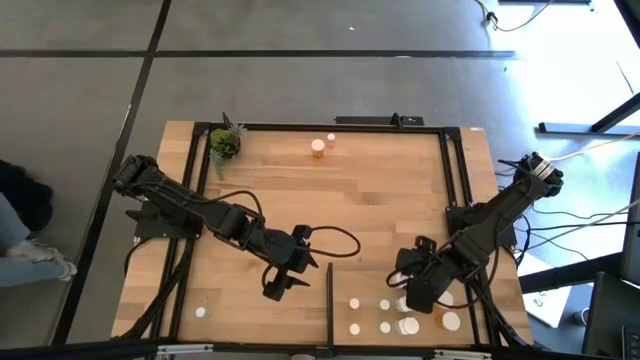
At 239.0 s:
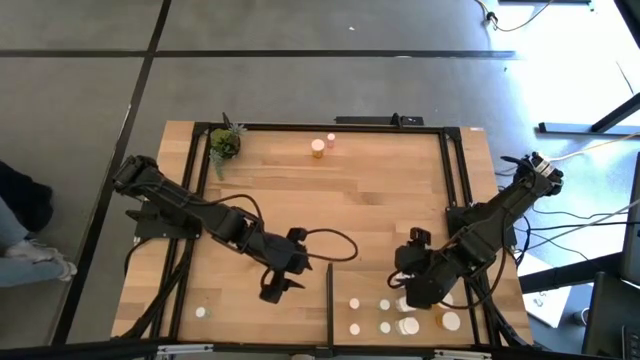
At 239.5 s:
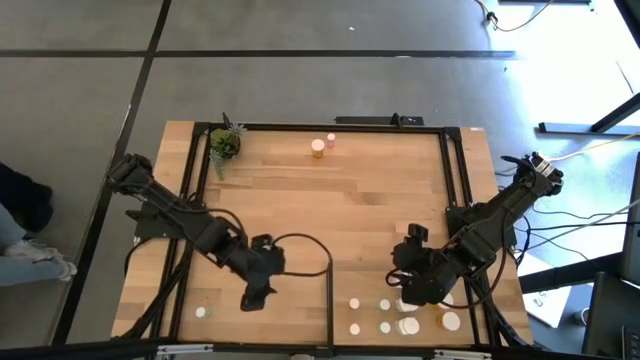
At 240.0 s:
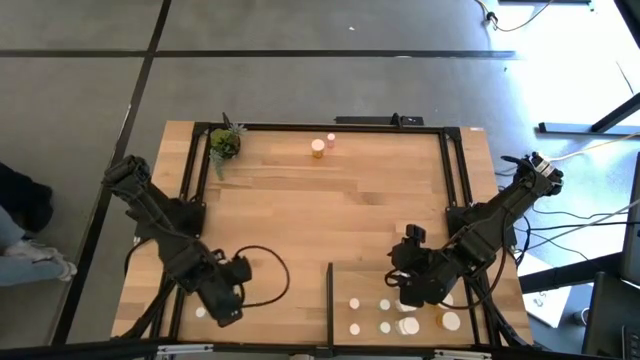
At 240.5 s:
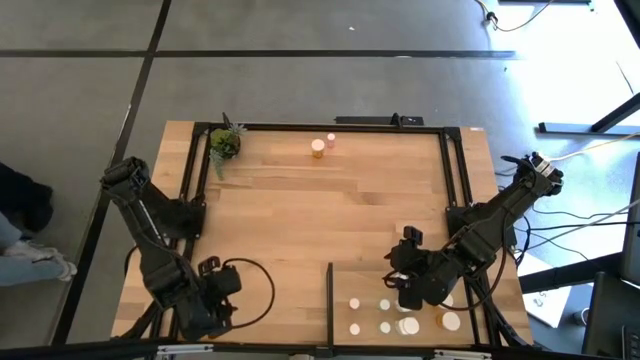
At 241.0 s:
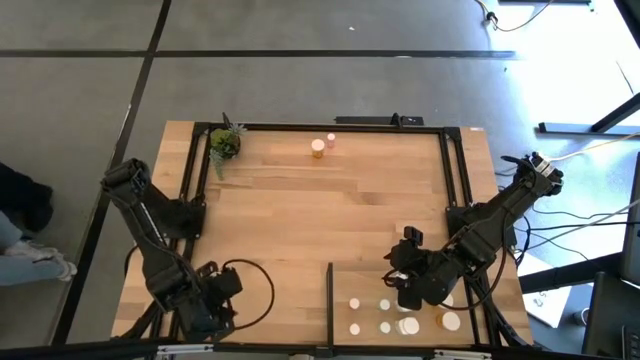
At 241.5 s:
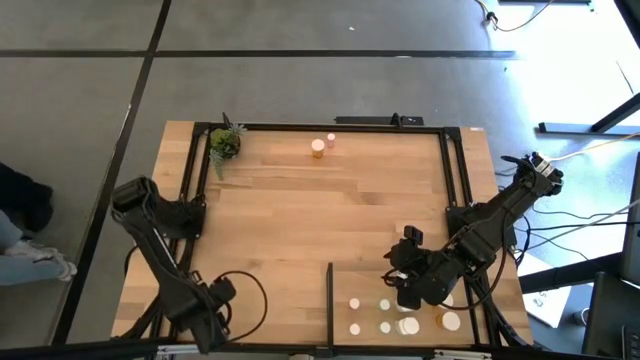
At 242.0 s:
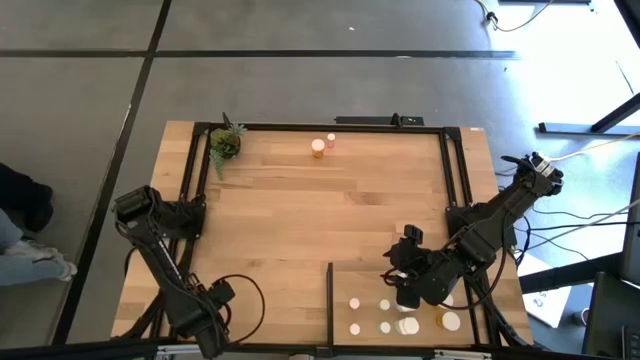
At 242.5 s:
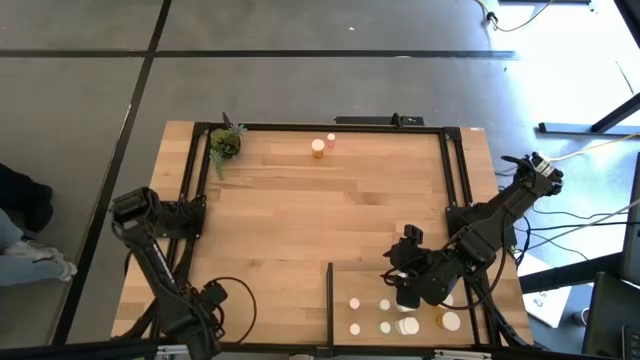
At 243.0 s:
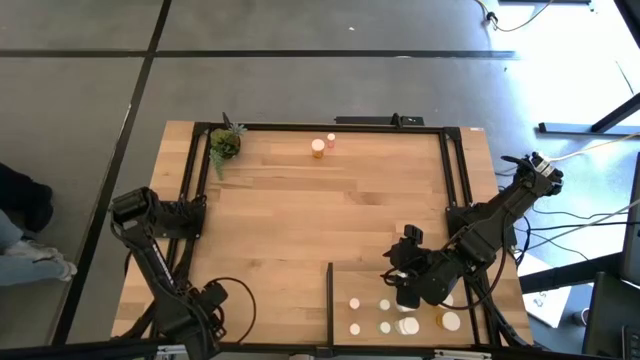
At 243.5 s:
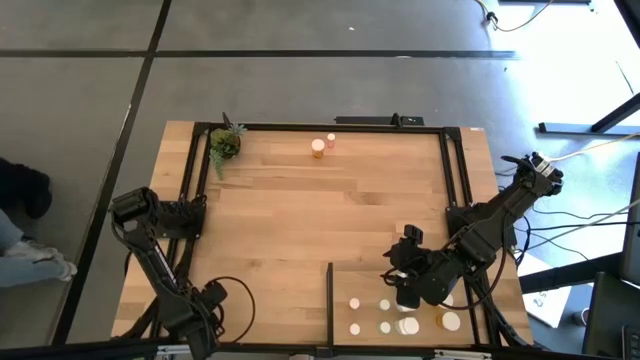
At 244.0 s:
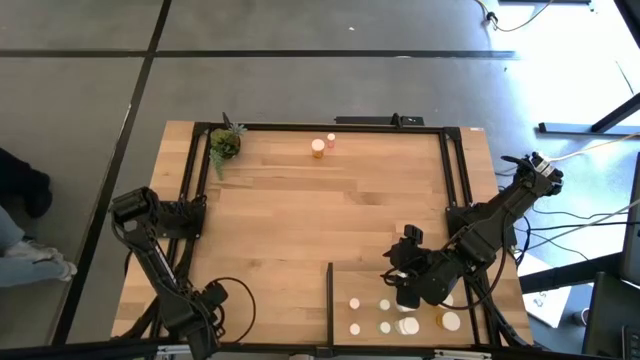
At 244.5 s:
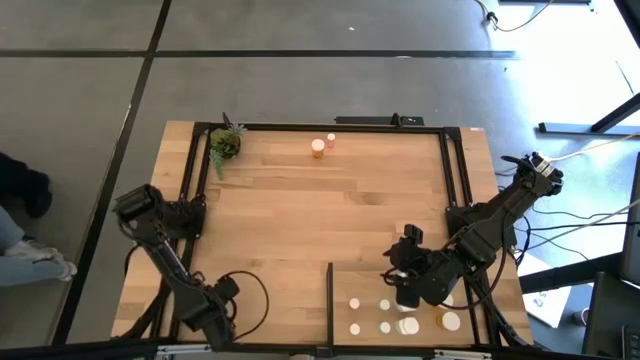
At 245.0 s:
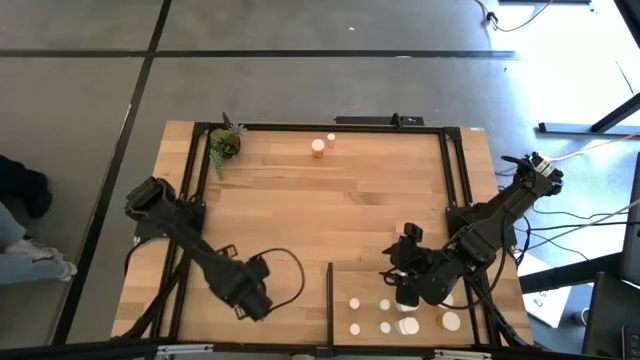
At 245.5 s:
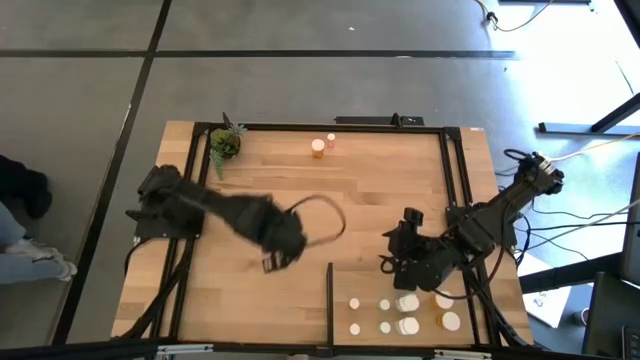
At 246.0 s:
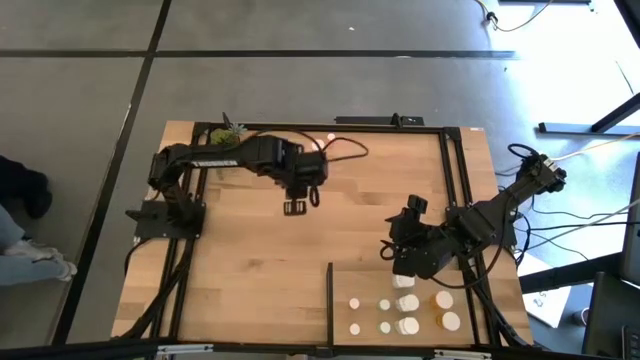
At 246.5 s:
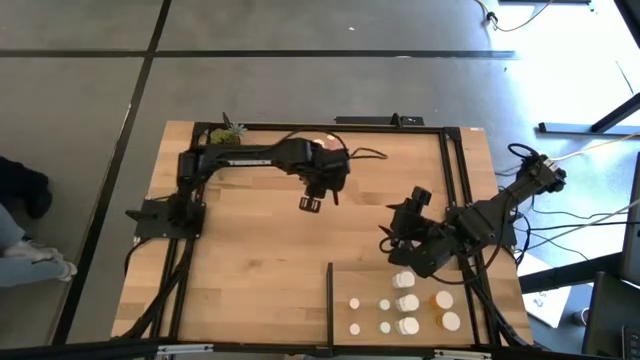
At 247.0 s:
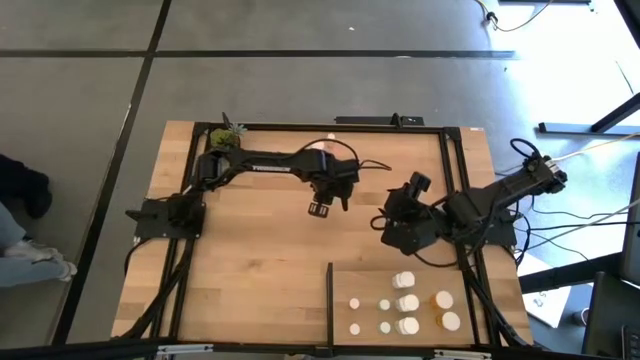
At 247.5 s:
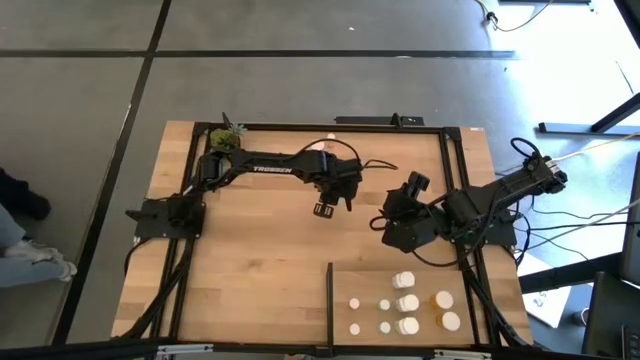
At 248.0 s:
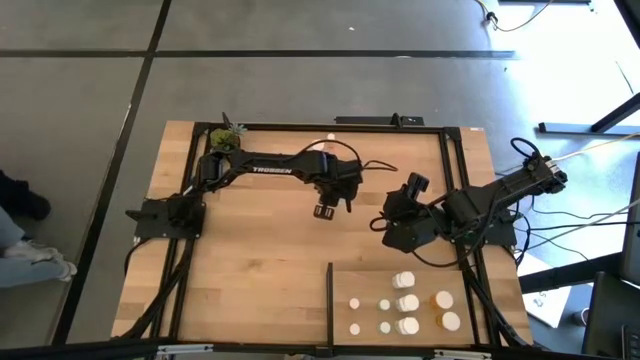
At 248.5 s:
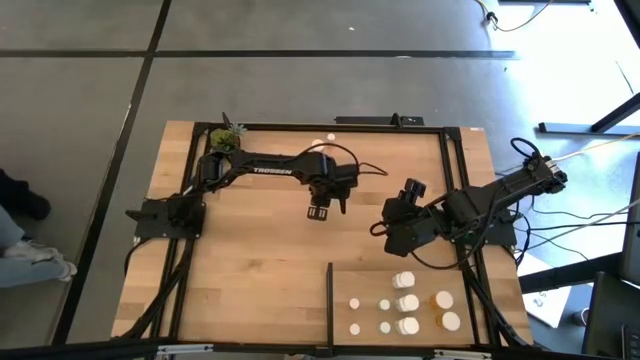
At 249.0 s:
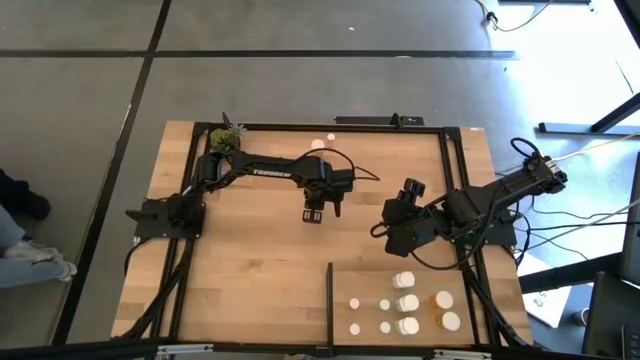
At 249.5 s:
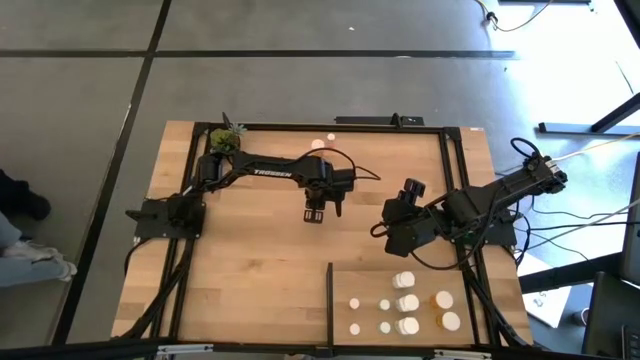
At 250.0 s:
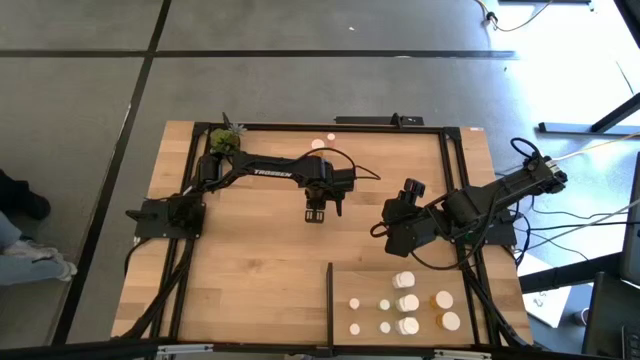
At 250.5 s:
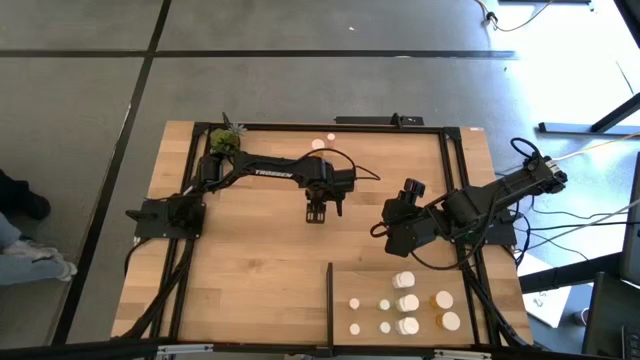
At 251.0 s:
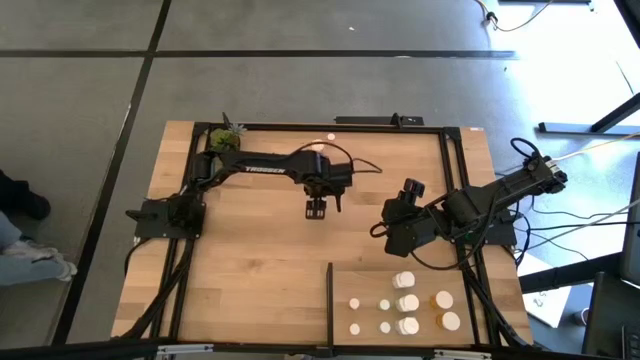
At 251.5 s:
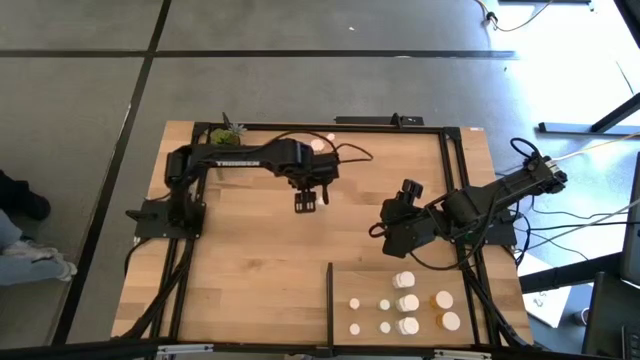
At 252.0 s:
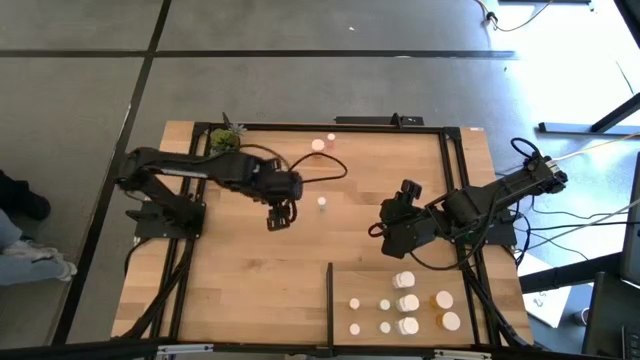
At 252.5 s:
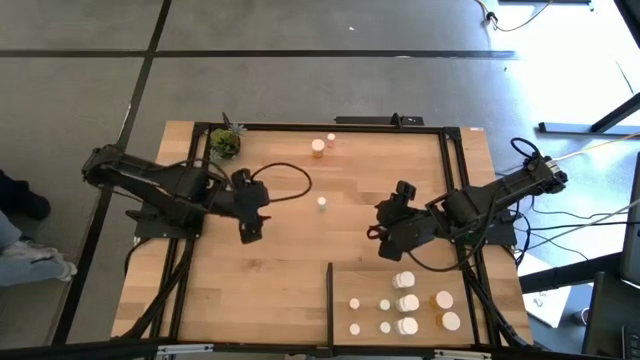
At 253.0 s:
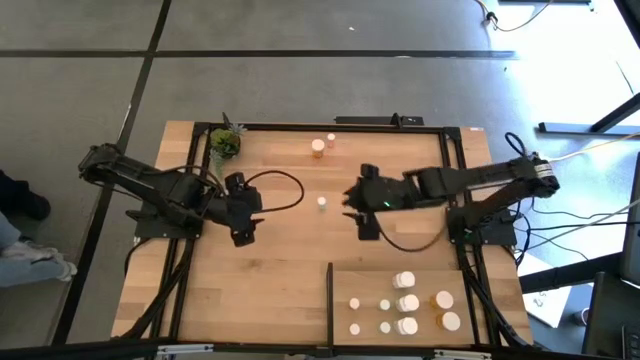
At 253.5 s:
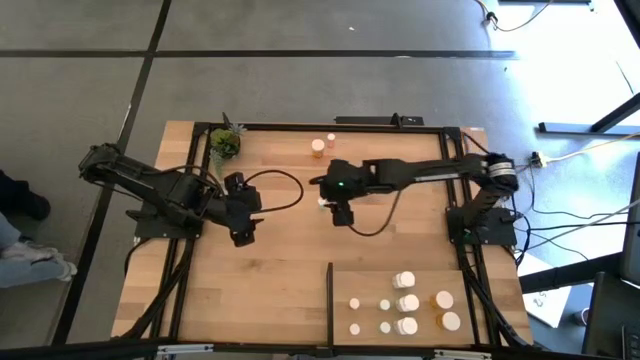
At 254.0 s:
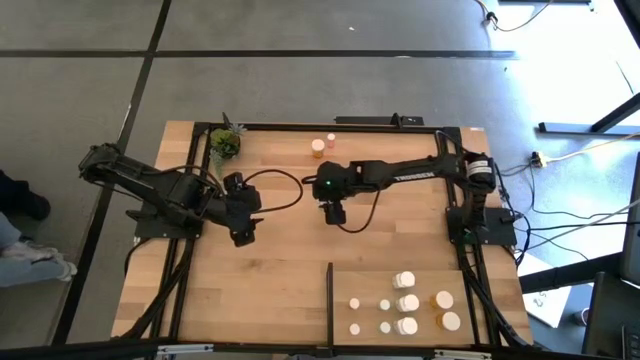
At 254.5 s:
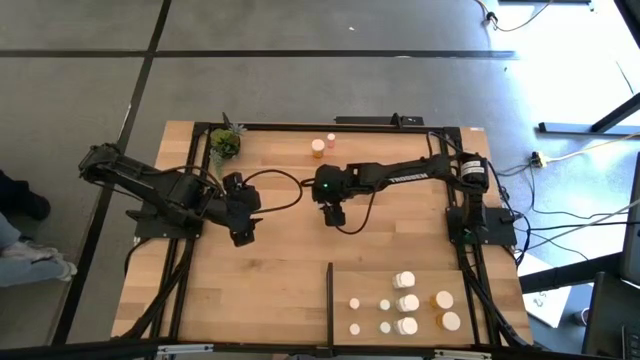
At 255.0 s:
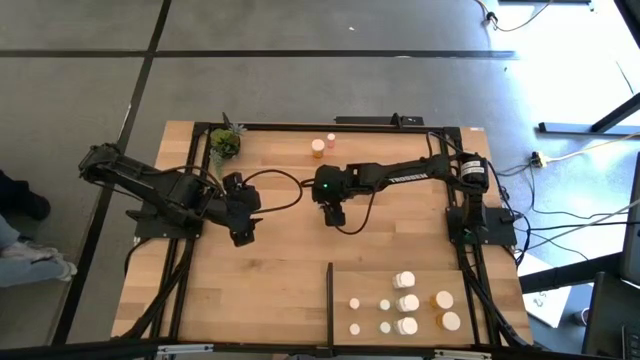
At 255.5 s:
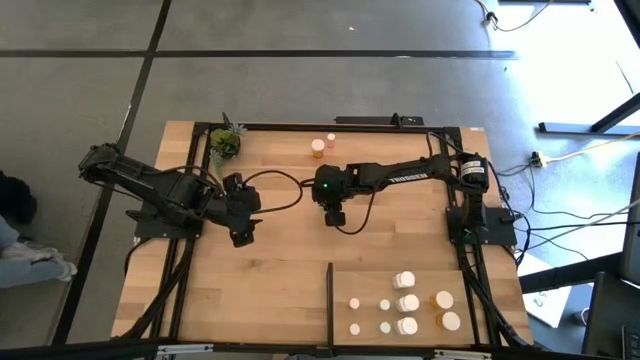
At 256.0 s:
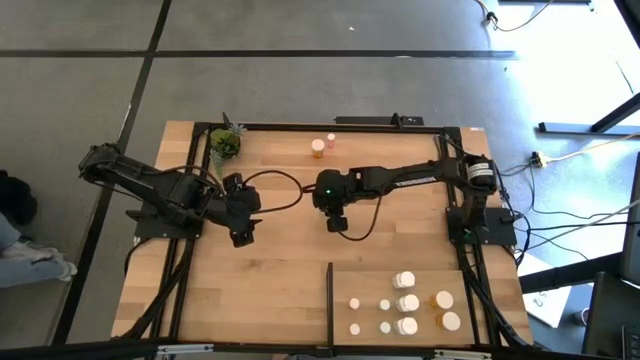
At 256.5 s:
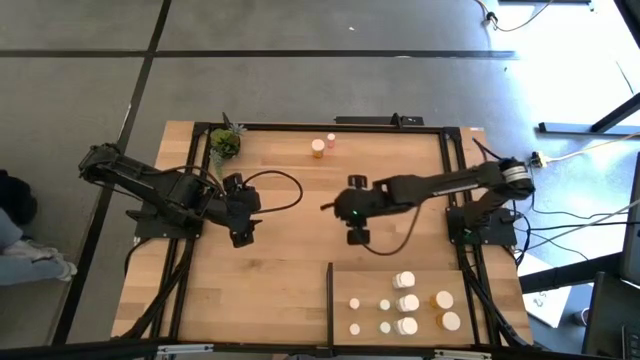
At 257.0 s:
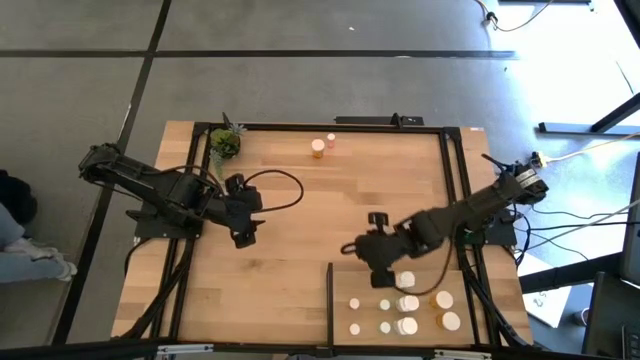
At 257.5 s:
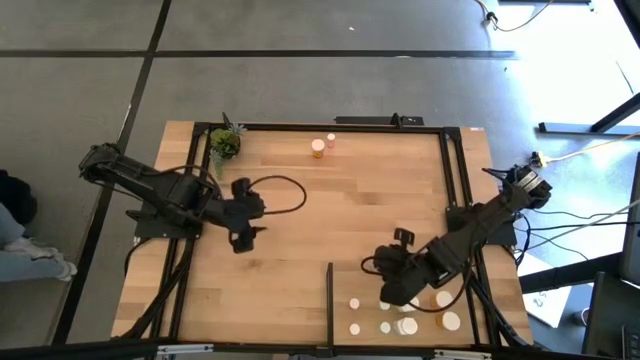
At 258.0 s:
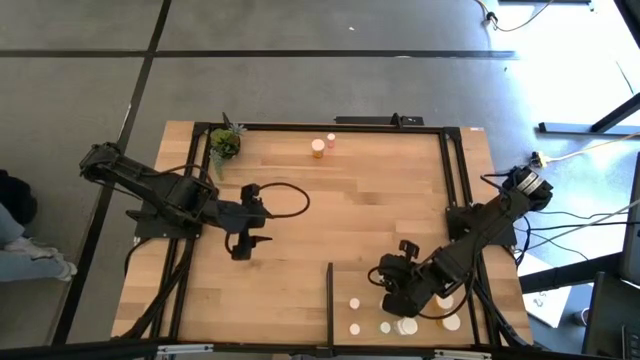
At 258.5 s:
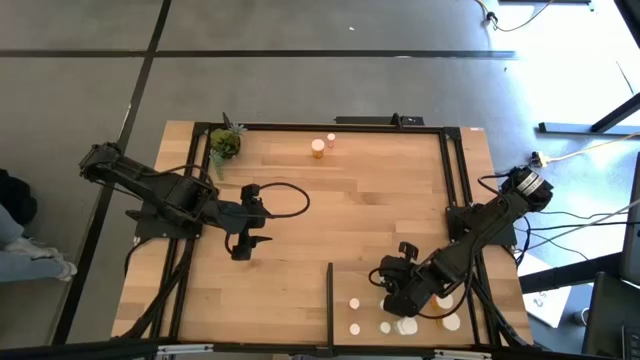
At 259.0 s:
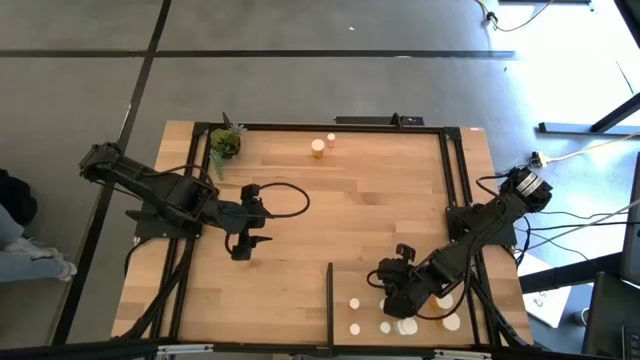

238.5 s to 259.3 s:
Task: Pick and place medicine bottles onto shelf by color
Put the blue pill bottle on the shelf aligned with the other blue pill bottles
